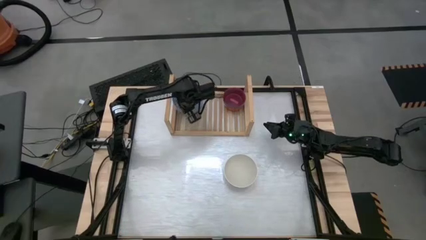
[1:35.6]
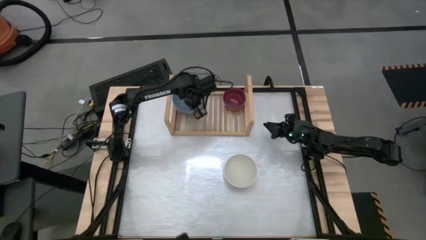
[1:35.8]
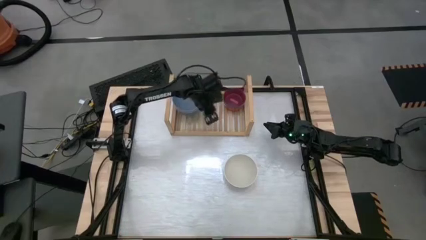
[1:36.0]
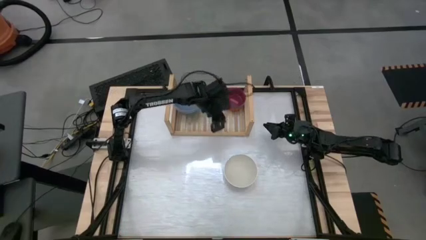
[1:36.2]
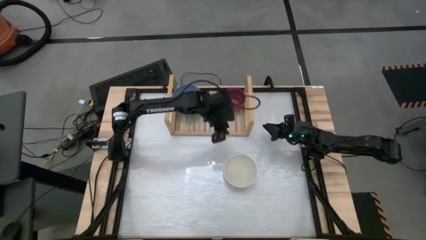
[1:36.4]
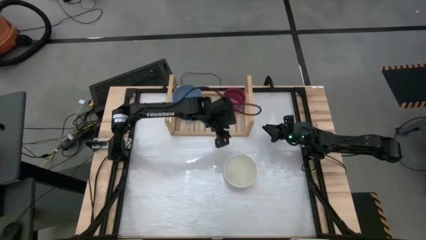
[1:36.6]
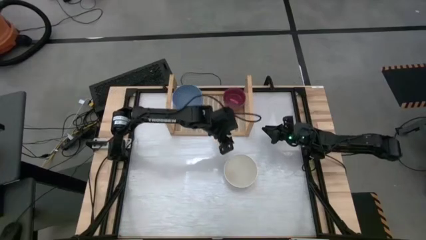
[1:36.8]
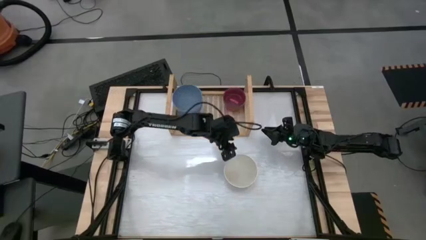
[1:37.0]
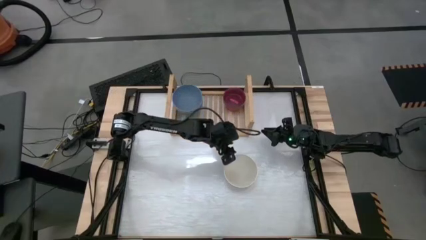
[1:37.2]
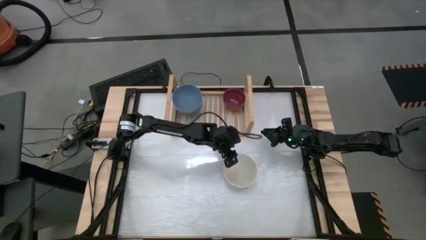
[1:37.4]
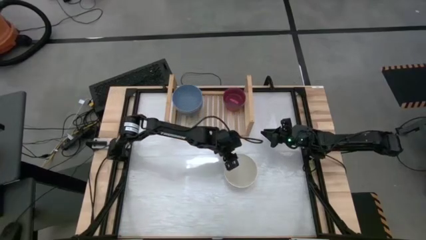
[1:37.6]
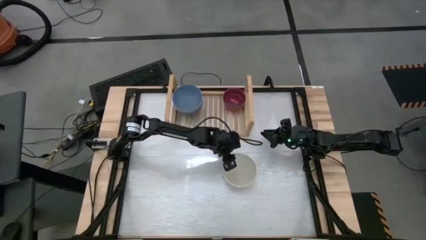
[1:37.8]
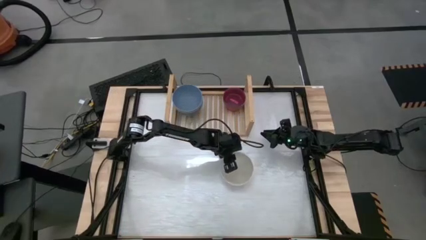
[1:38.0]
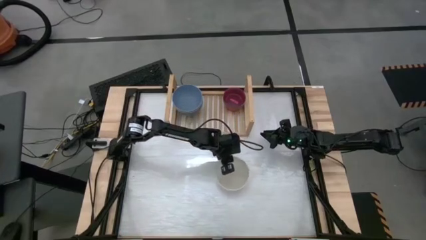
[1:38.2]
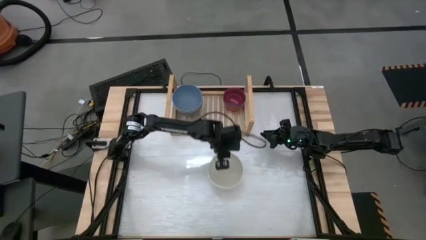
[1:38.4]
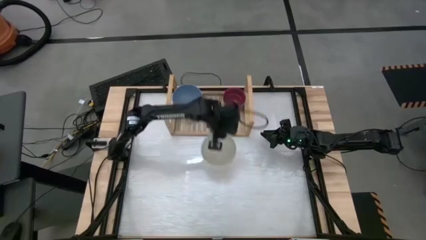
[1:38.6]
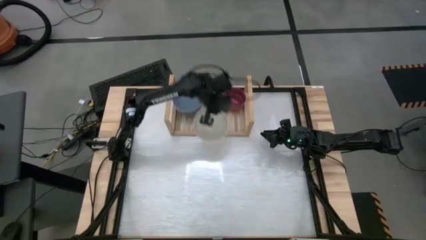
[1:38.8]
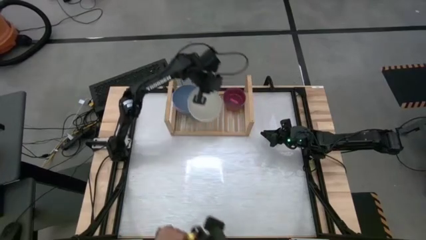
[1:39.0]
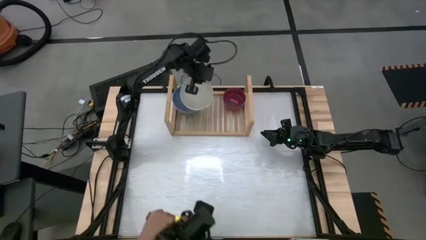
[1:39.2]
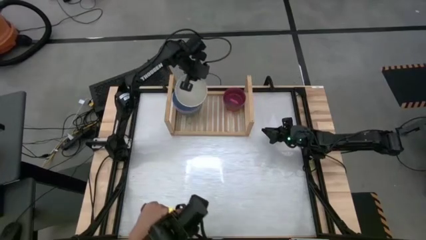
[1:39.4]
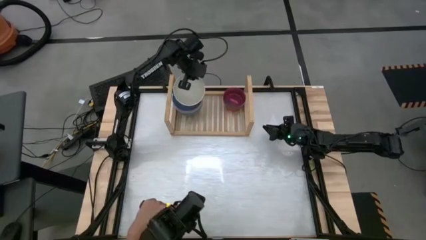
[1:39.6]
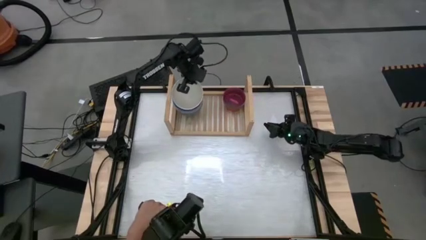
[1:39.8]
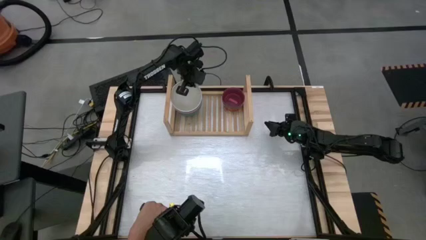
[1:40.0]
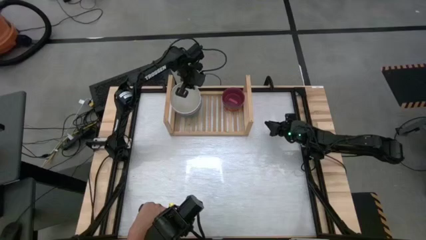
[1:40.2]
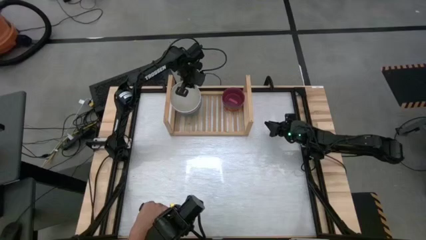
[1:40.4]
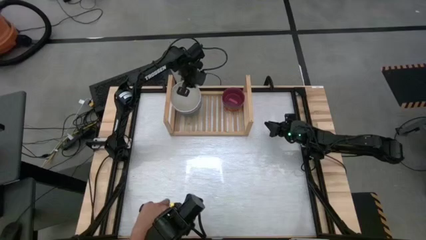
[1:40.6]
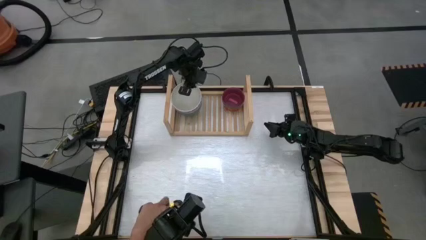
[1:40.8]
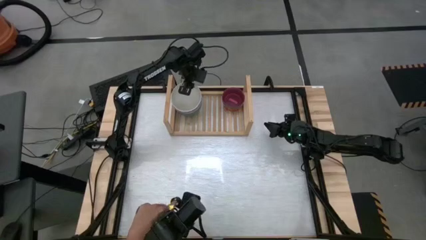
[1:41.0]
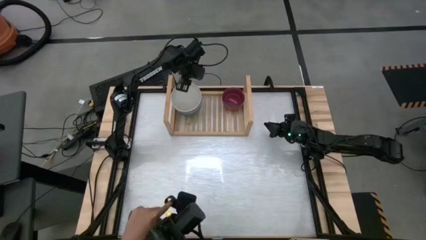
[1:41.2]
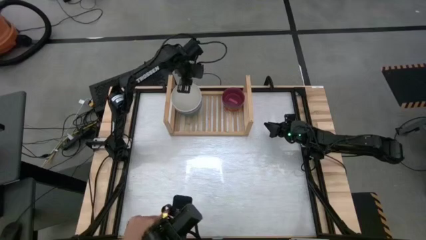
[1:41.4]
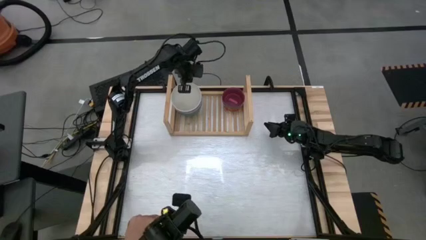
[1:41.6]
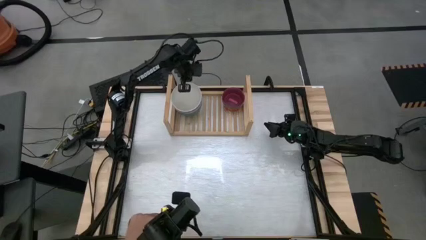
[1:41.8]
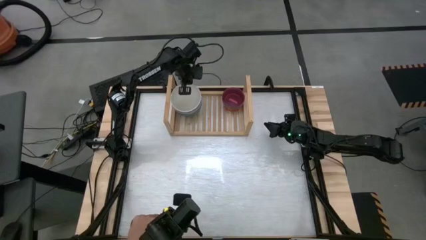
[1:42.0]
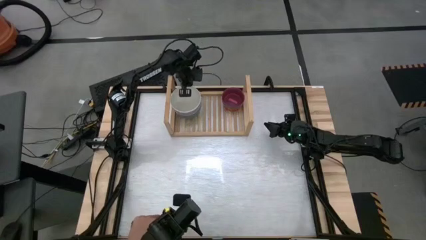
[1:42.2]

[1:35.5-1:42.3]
Task: Place and stack bowls onto a shelf
Stack the large white bowl on top of the large blue bowl on the shelf

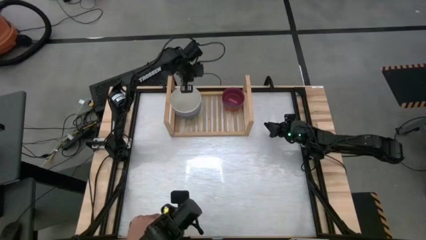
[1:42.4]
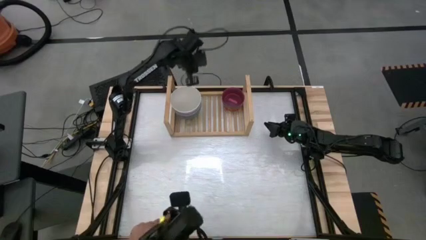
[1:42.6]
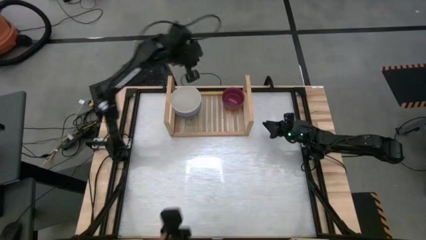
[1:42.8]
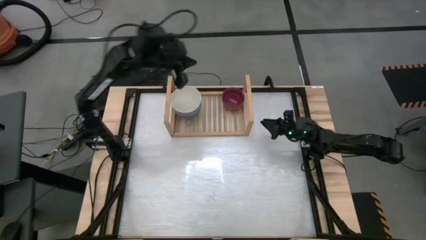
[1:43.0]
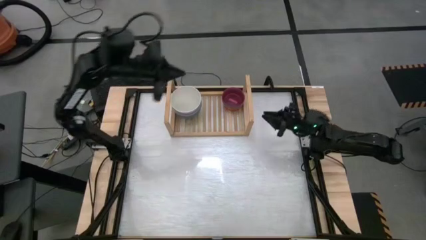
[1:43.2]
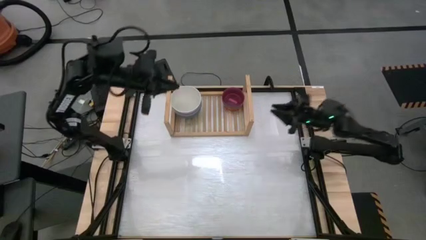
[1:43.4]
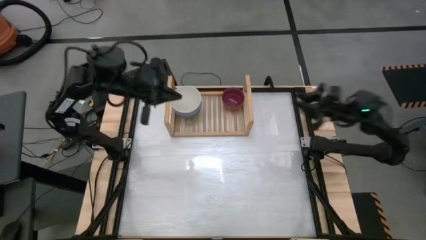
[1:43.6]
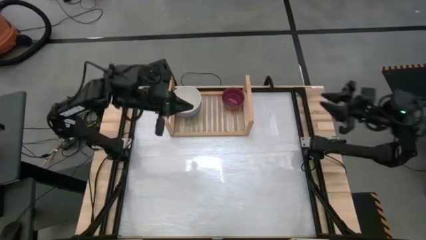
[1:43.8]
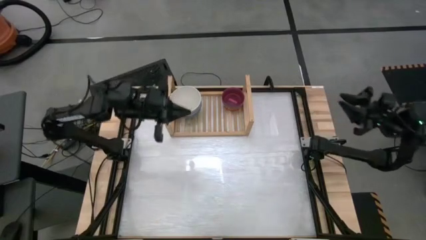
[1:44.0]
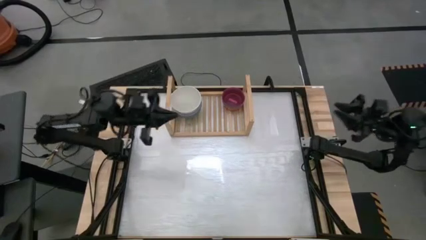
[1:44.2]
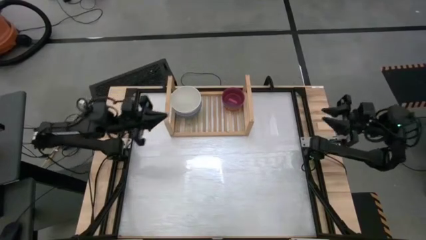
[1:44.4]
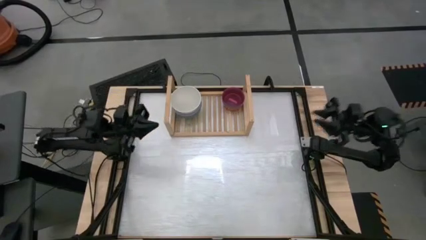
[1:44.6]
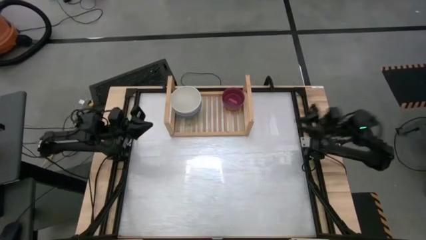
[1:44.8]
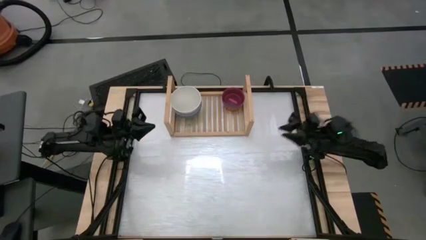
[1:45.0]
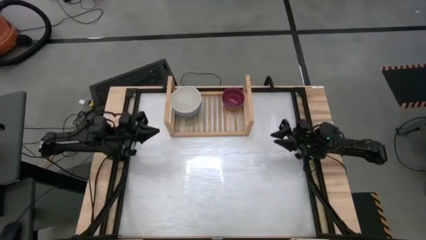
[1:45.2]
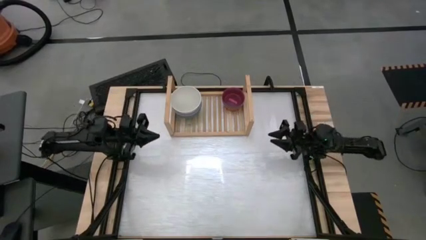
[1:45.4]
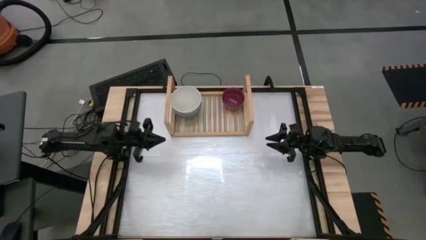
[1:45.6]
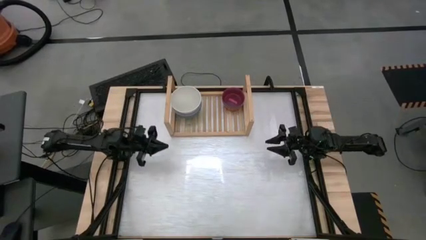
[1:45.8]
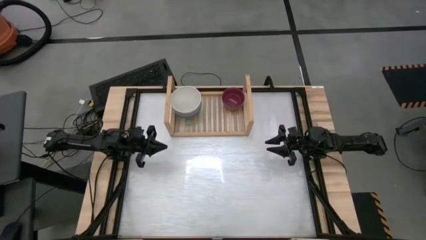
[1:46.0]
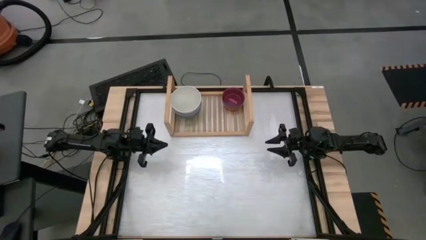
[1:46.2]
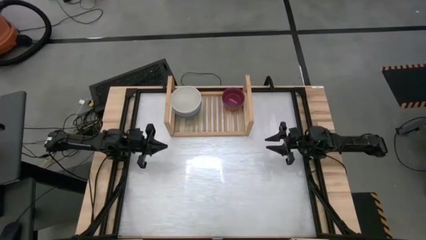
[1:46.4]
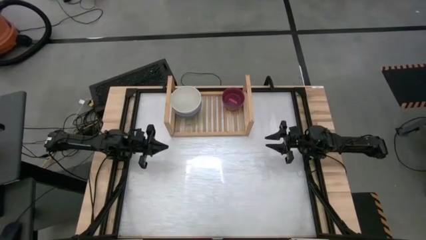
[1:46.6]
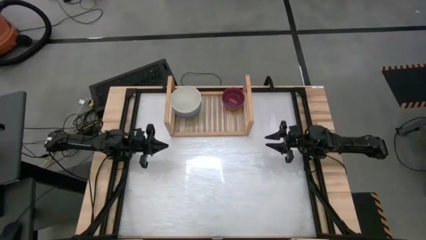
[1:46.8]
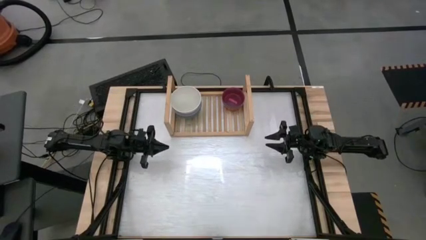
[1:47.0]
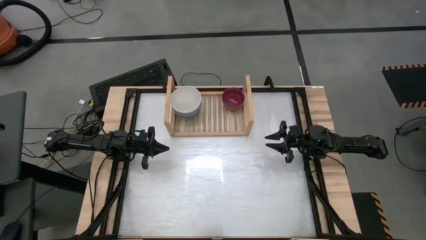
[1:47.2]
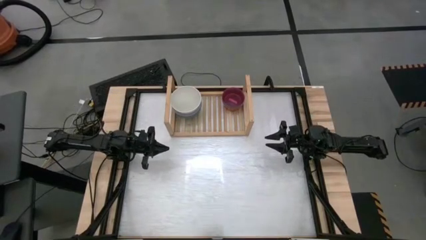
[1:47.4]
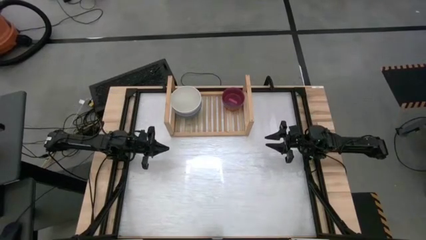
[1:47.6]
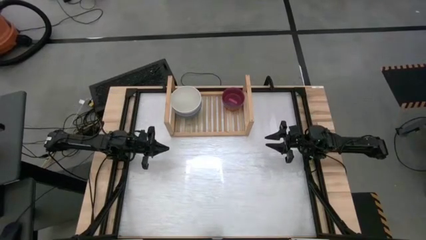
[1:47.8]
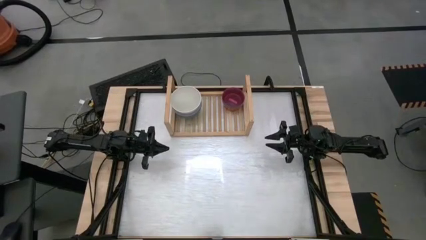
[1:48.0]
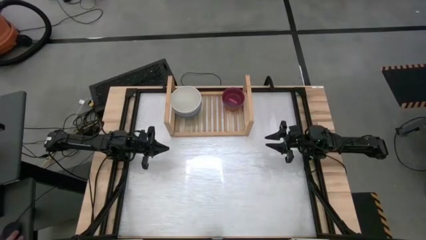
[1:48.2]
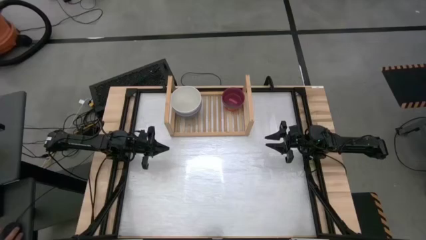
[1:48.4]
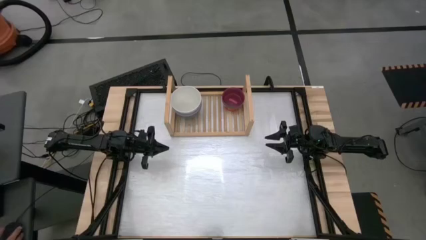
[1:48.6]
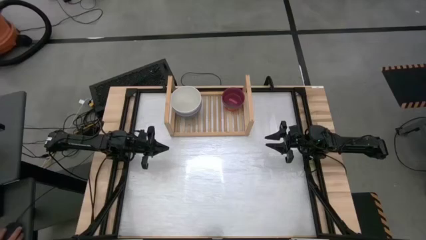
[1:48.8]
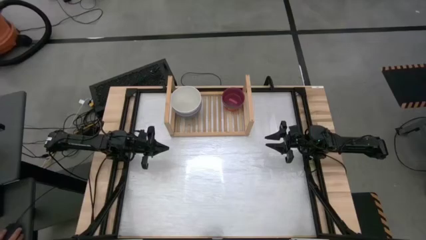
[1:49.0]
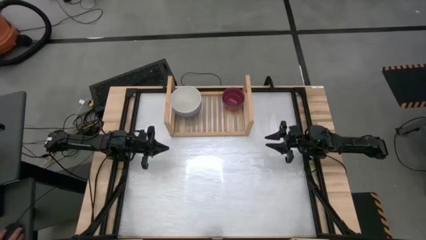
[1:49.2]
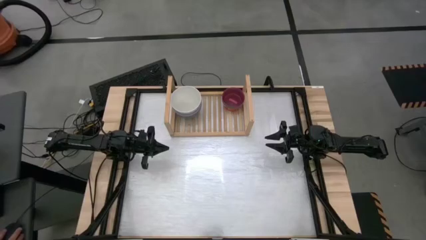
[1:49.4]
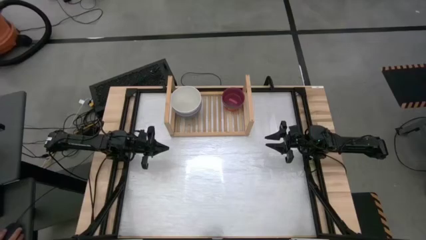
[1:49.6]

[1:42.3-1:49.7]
Return to Home Position
